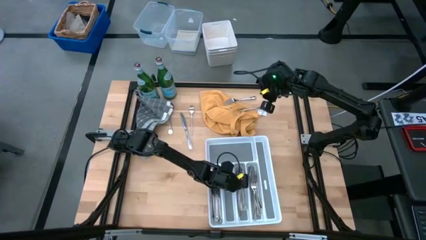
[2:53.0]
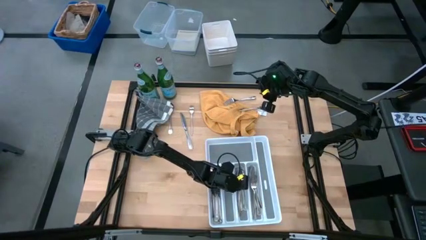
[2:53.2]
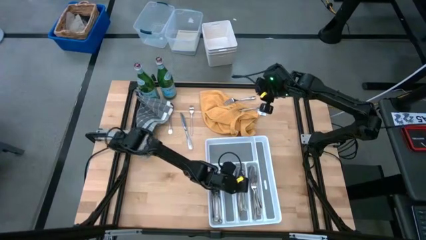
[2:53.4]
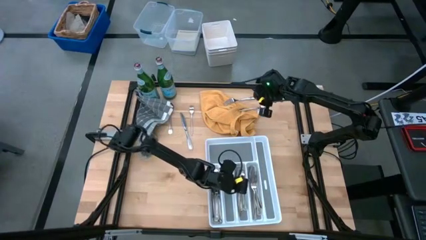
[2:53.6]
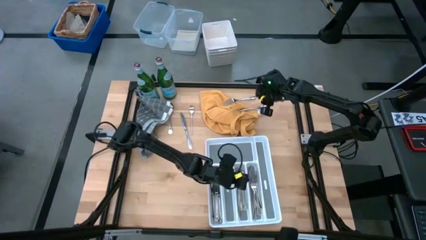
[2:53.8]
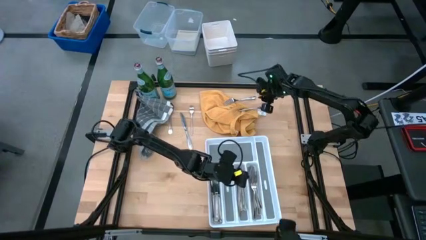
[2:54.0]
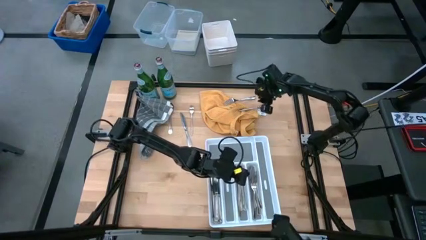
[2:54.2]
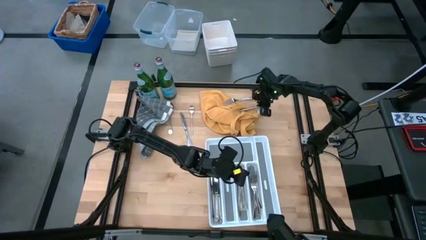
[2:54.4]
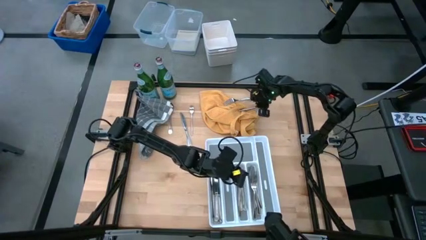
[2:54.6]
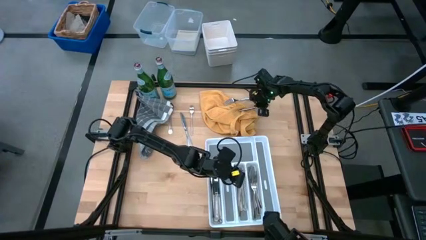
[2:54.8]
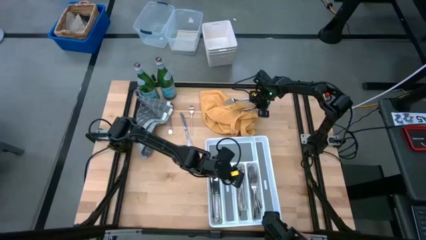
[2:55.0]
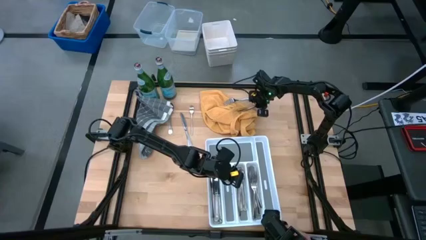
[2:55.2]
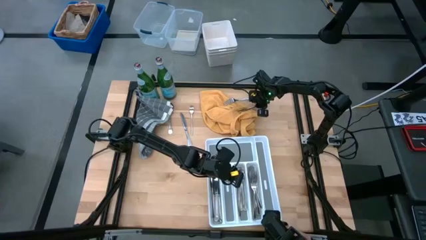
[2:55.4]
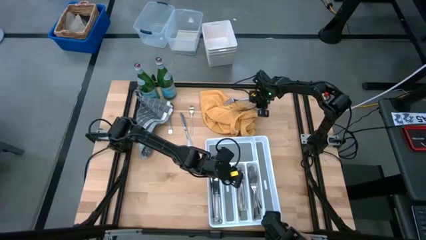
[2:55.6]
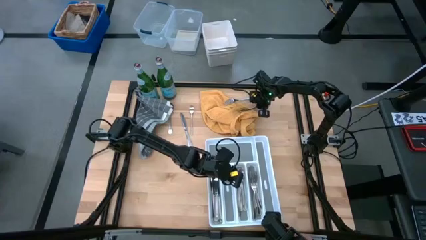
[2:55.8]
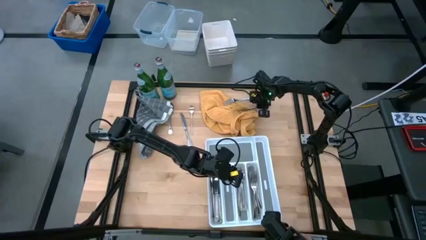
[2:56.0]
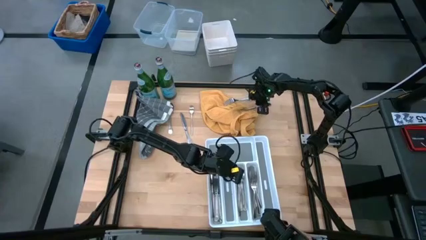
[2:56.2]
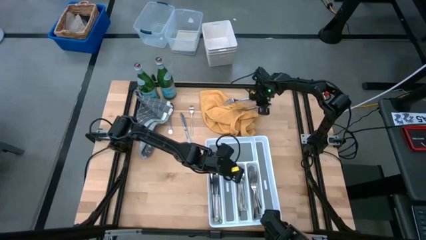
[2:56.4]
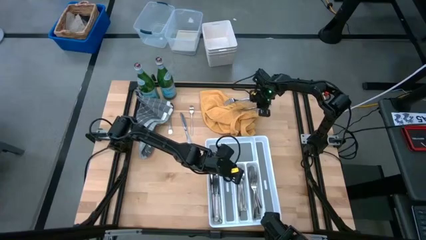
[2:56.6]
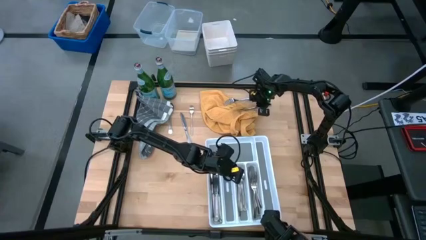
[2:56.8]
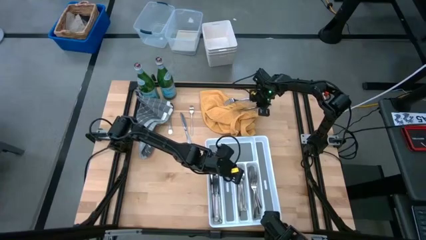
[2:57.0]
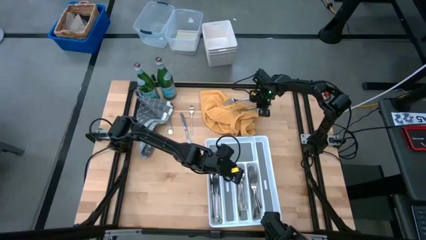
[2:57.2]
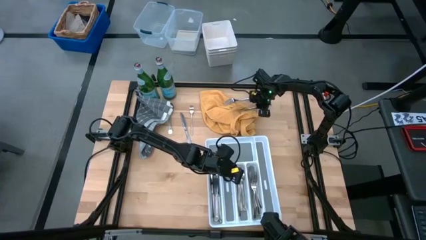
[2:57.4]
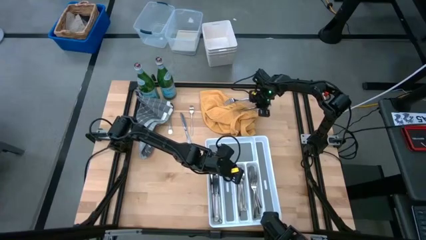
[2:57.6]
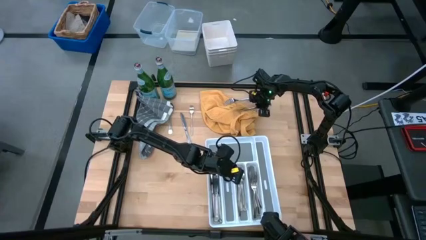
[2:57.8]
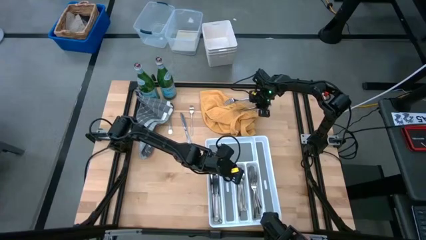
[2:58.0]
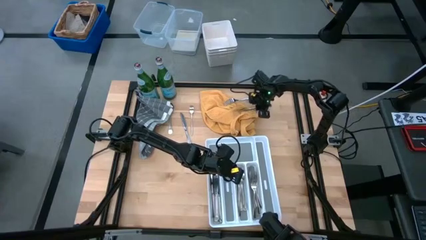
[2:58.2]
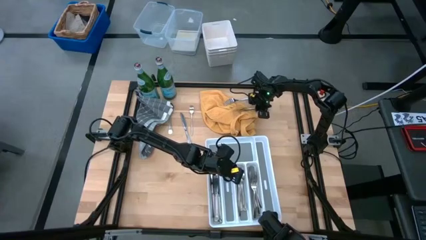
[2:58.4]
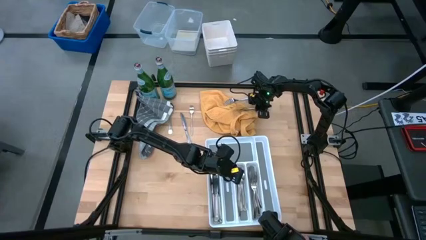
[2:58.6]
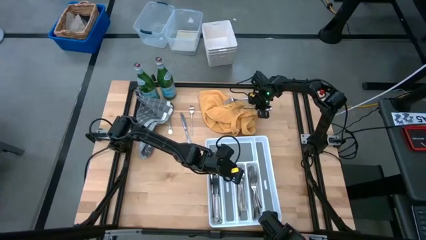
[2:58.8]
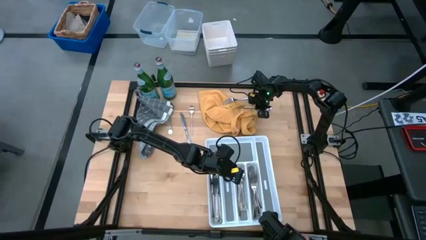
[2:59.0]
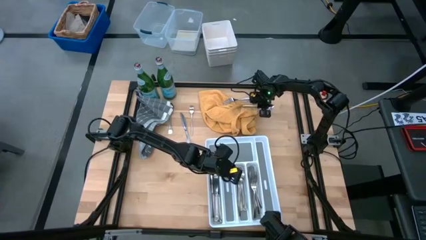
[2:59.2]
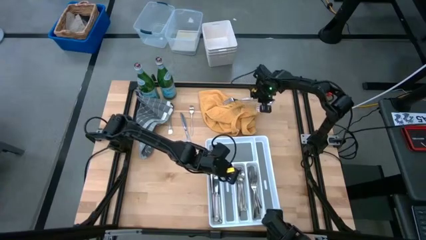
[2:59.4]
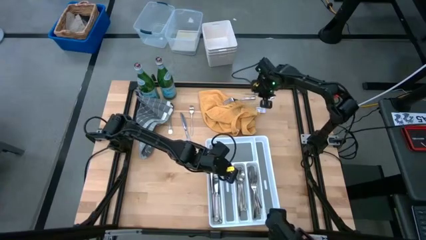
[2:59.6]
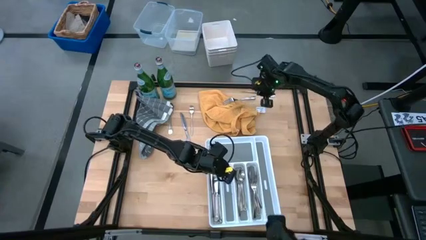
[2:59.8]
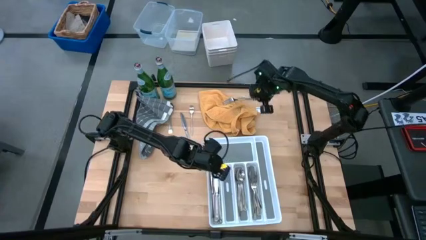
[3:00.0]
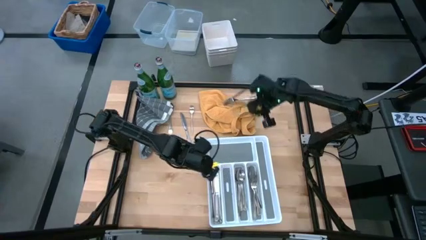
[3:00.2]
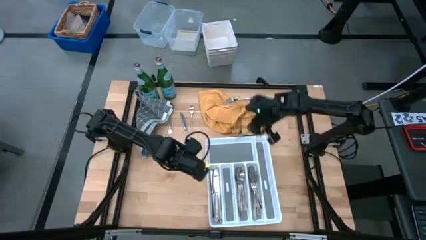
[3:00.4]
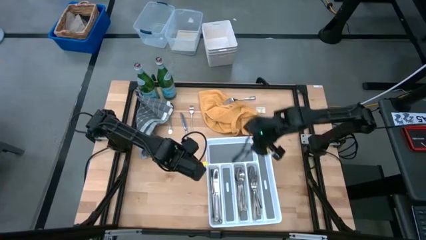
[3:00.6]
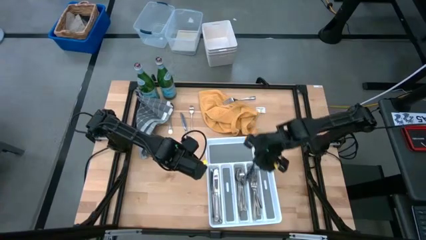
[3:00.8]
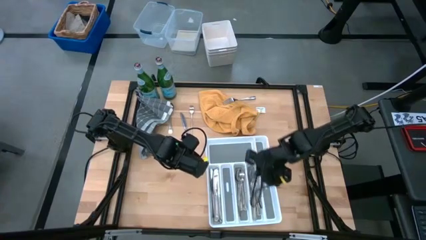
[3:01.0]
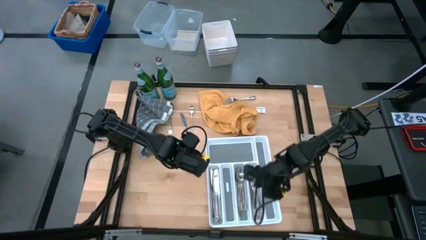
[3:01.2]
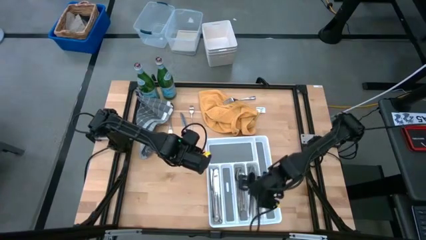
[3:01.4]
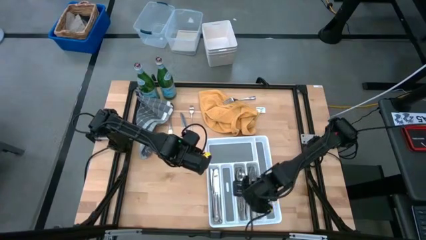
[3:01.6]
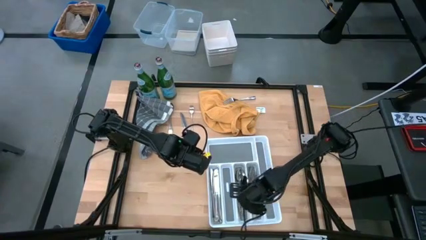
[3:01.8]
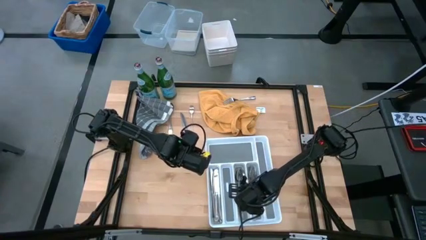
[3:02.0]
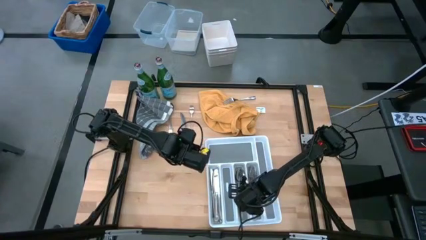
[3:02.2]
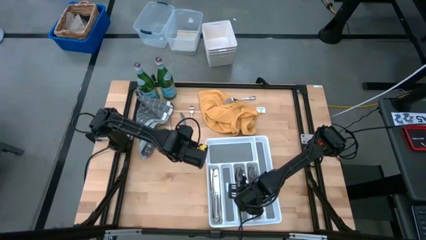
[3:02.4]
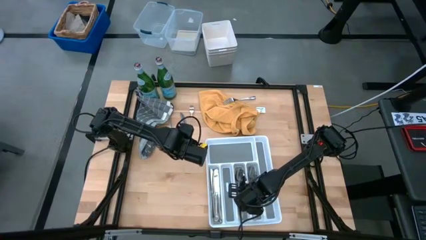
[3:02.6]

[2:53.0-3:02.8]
Task: Sort silverware
Put the spoon into the silverware tray

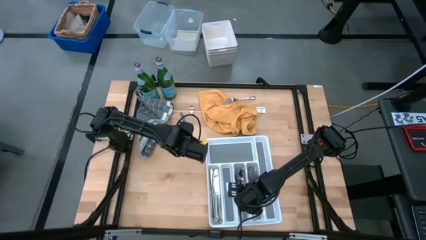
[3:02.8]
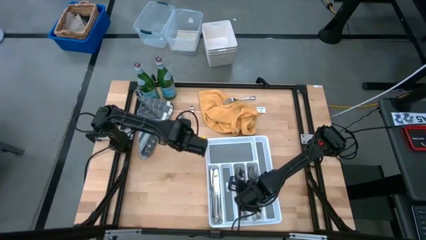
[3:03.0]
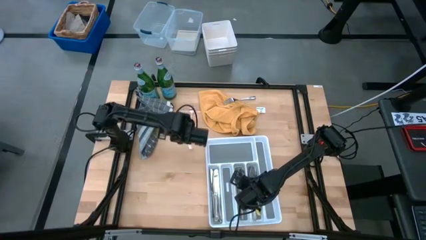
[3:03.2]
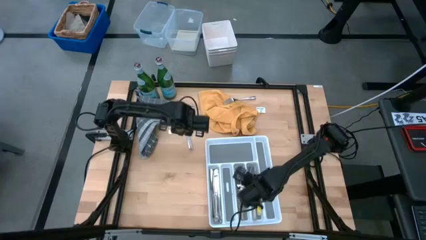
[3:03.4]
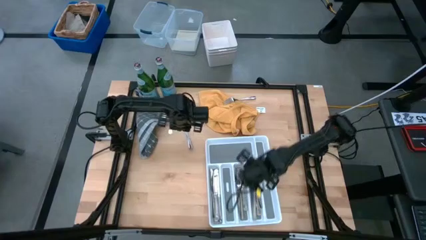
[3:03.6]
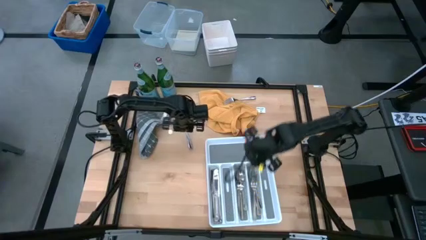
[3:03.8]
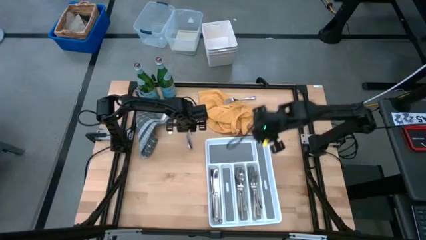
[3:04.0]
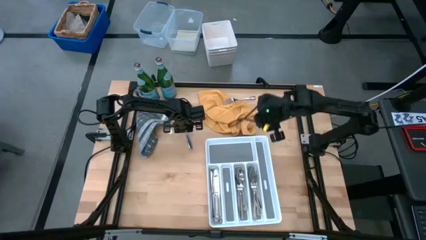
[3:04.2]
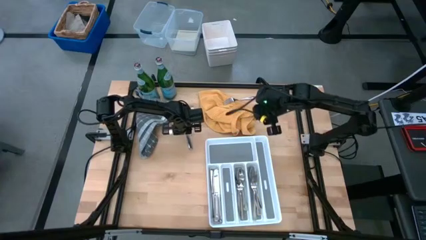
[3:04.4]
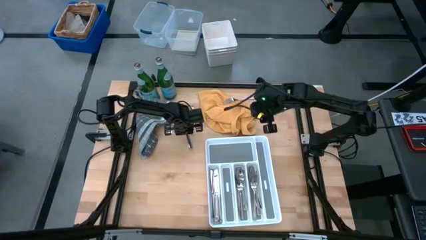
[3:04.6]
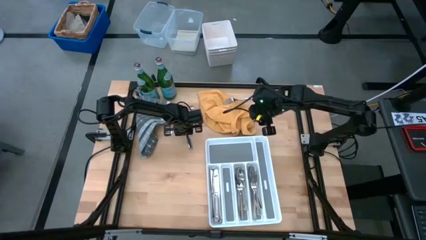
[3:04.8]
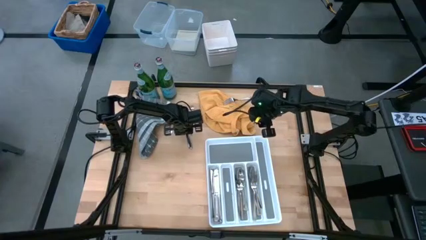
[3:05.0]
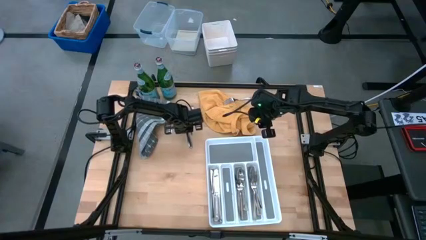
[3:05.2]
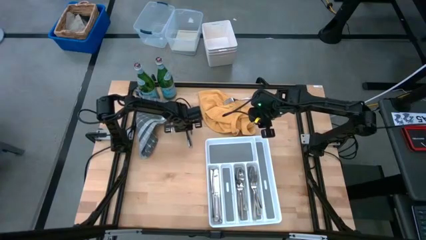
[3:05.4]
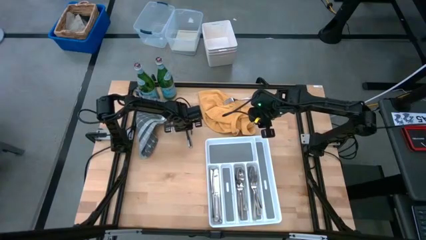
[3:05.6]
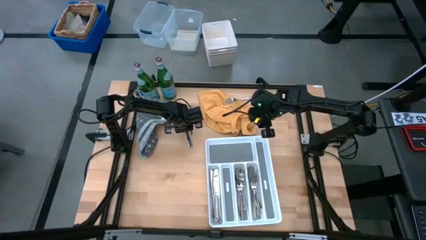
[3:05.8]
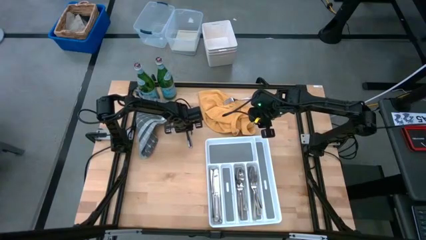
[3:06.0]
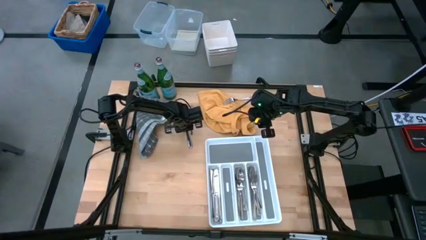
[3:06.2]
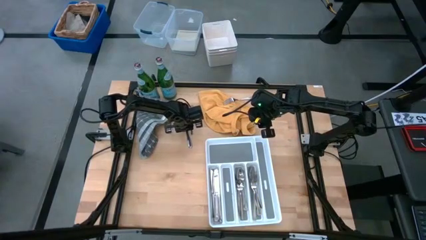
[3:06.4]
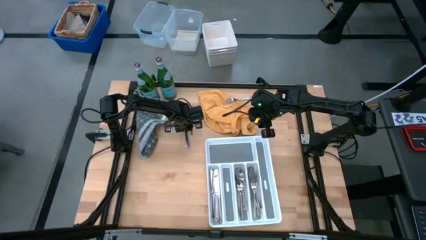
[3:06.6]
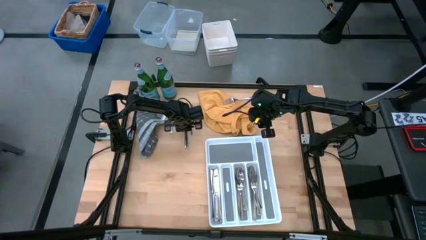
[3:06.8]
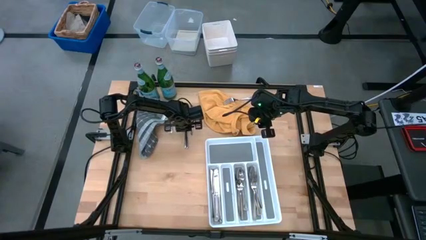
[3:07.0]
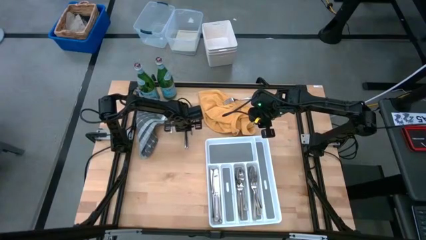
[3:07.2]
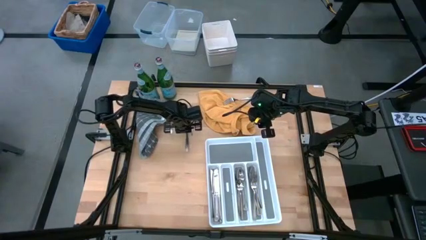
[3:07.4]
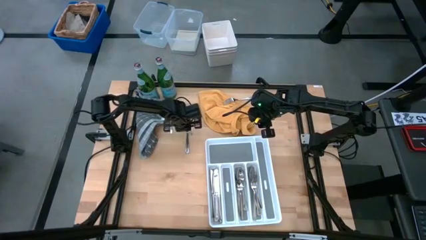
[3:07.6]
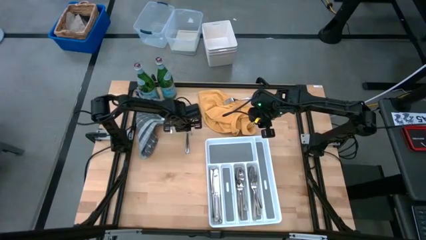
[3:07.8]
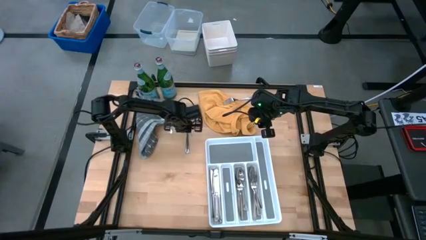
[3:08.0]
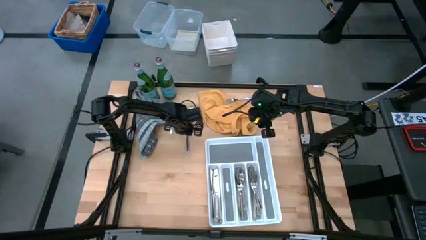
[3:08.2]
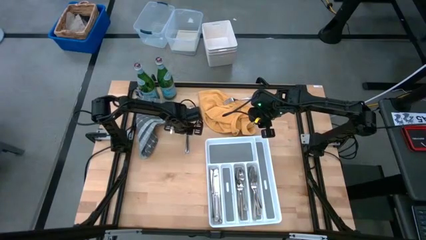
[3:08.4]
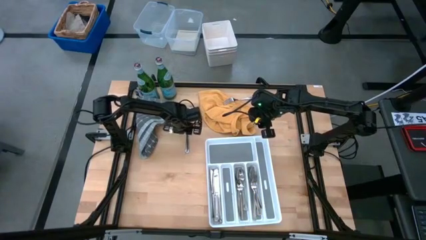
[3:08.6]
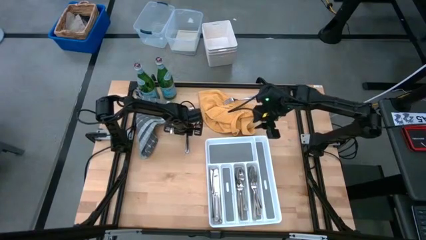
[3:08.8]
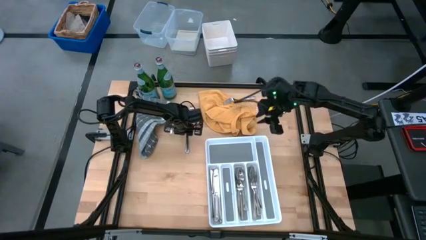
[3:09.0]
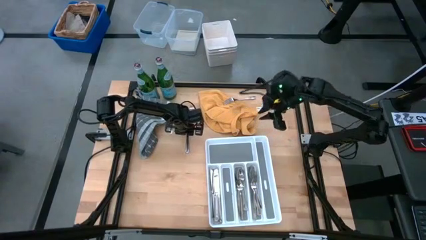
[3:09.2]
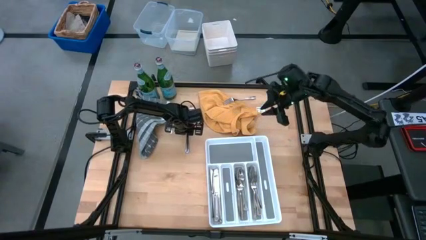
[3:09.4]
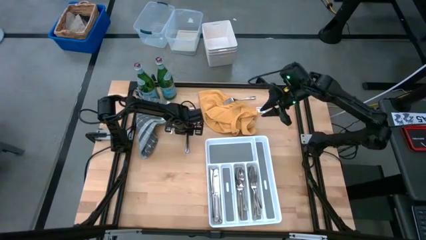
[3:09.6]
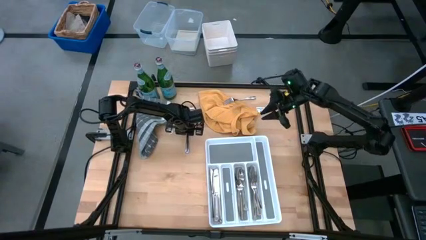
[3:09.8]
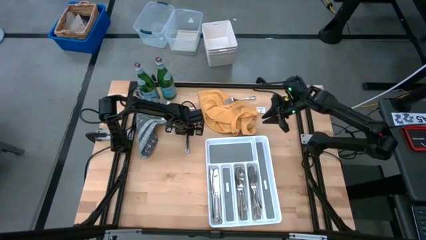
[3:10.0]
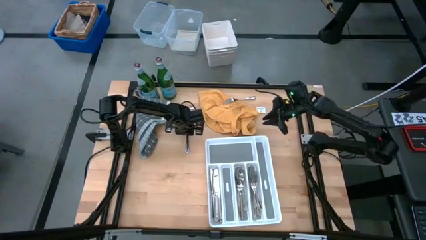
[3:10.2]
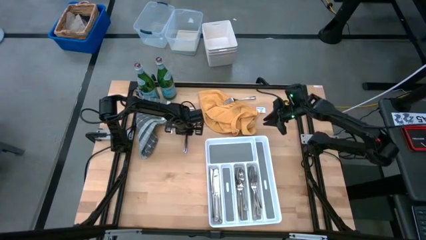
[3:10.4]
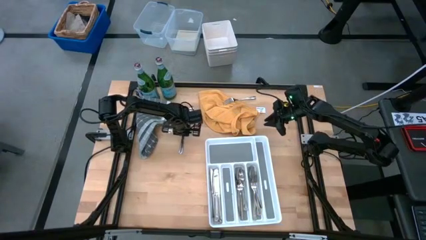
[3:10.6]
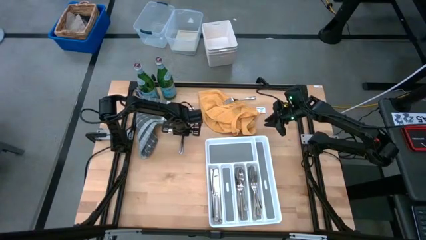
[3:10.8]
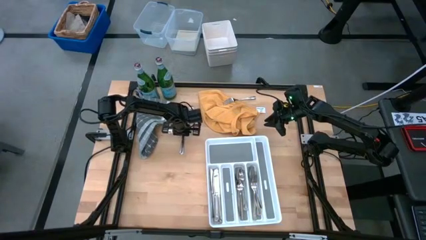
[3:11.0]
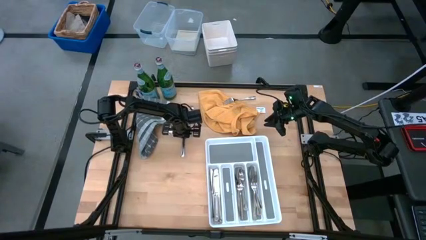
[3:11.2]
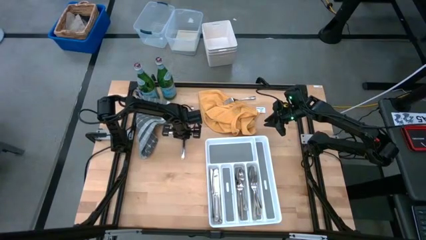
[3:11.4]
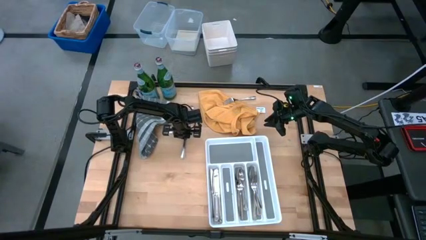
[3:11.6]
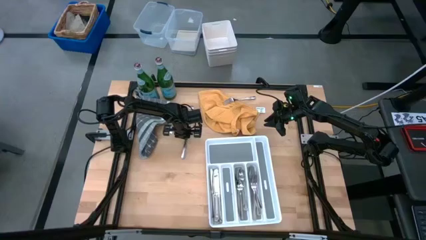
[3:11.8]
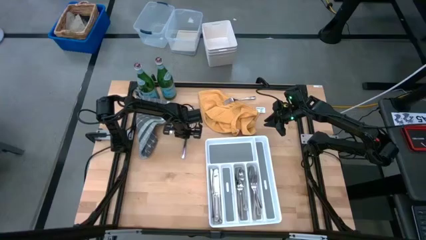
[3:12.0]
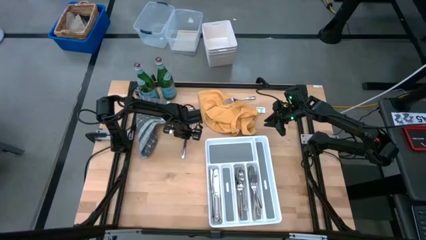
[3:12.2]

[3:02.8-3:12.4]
Put the table knife into the silverware tray
